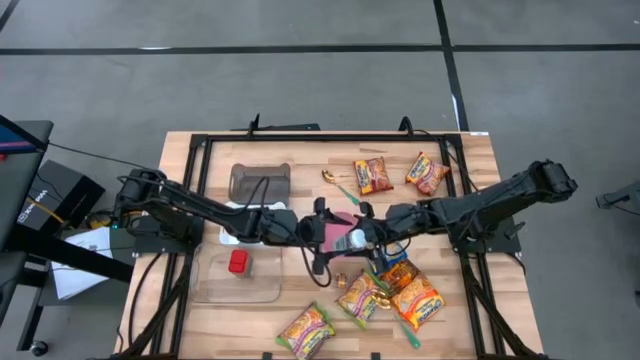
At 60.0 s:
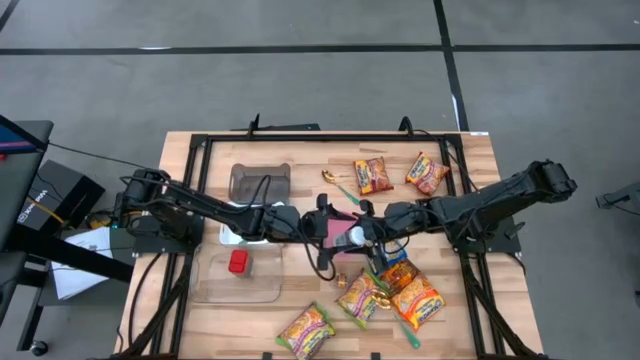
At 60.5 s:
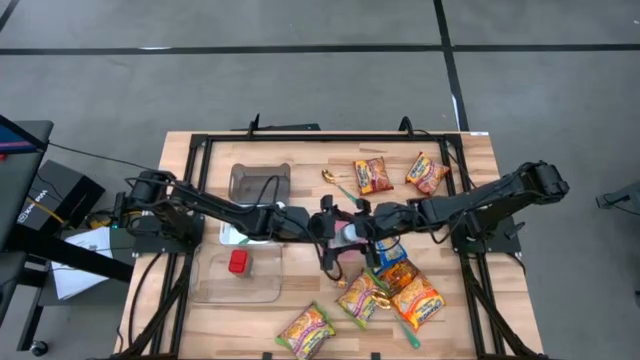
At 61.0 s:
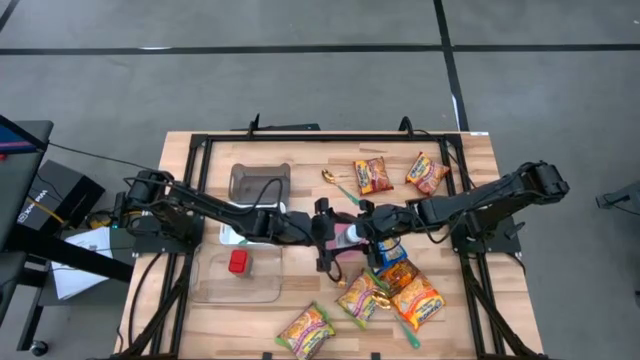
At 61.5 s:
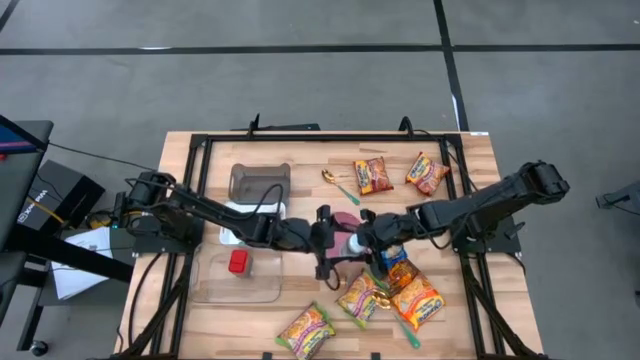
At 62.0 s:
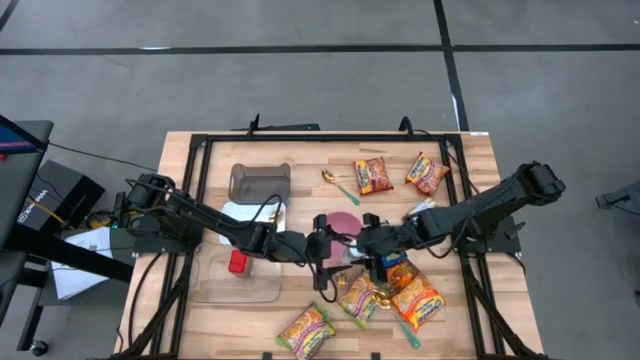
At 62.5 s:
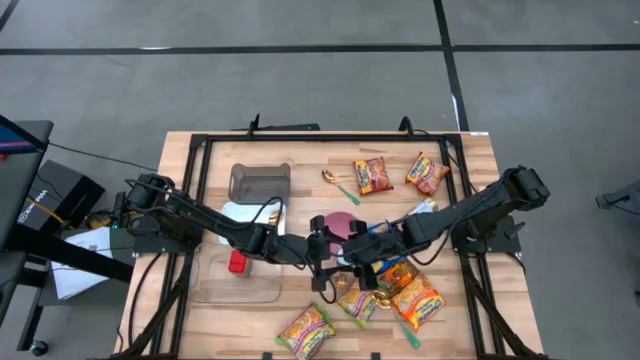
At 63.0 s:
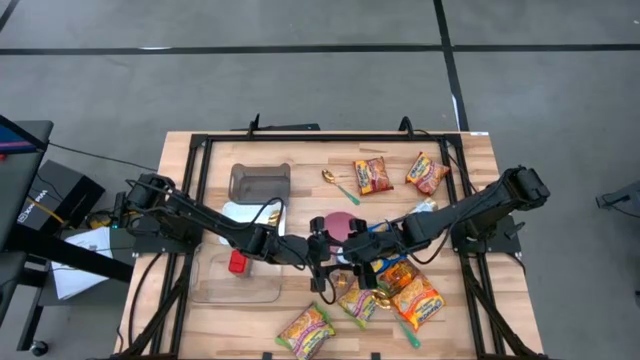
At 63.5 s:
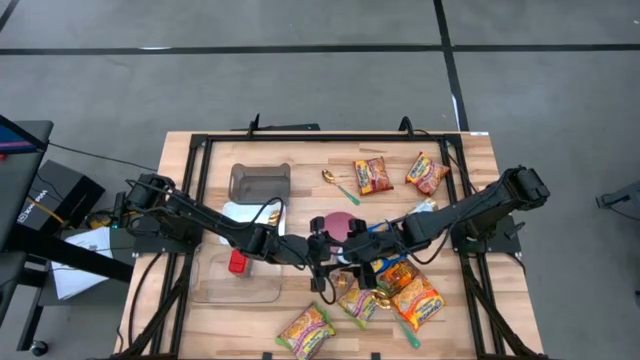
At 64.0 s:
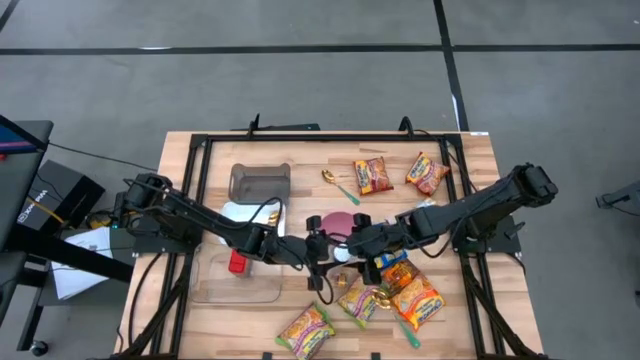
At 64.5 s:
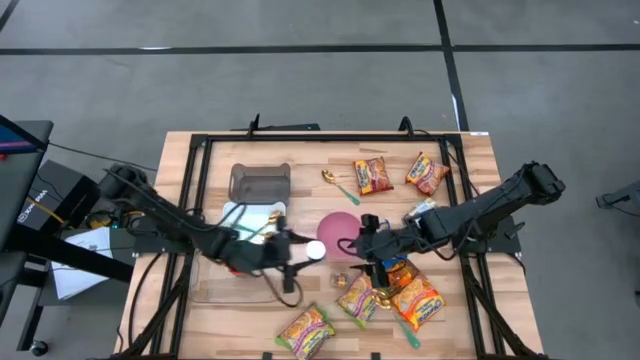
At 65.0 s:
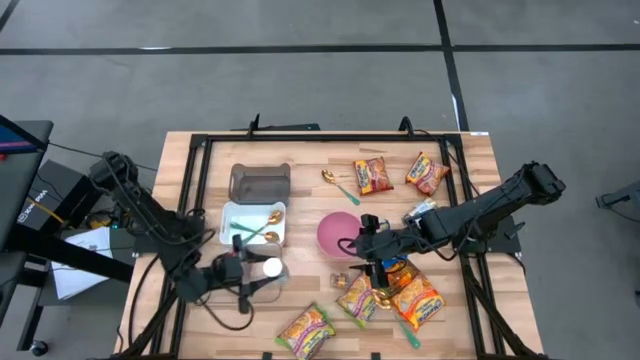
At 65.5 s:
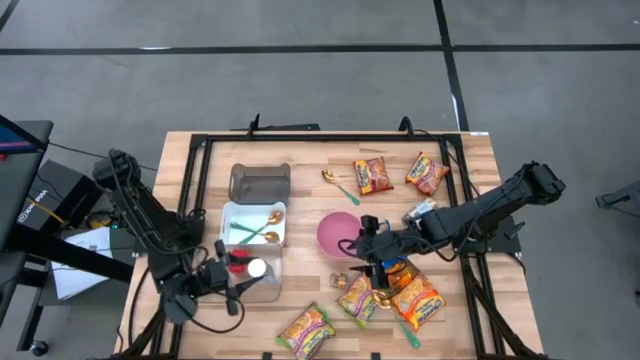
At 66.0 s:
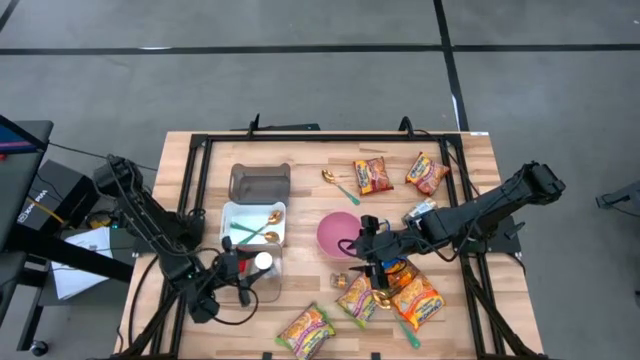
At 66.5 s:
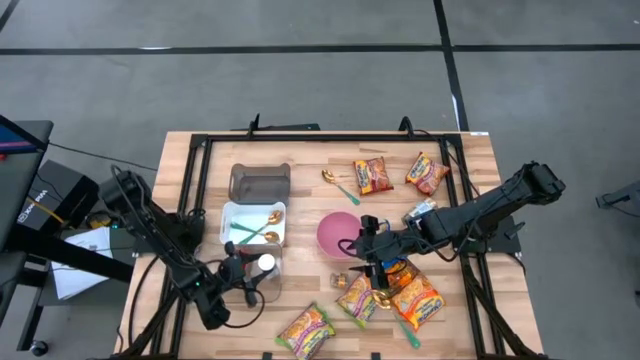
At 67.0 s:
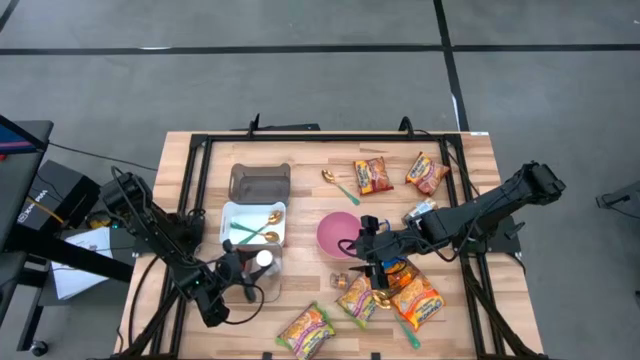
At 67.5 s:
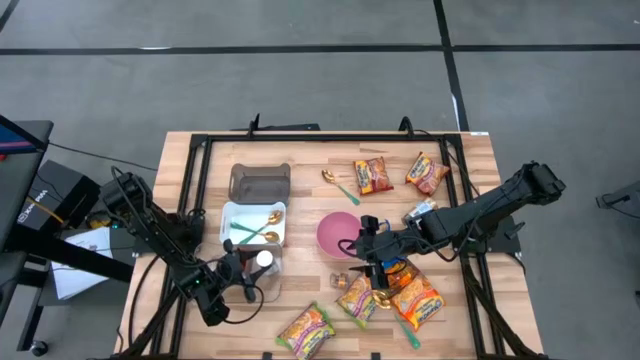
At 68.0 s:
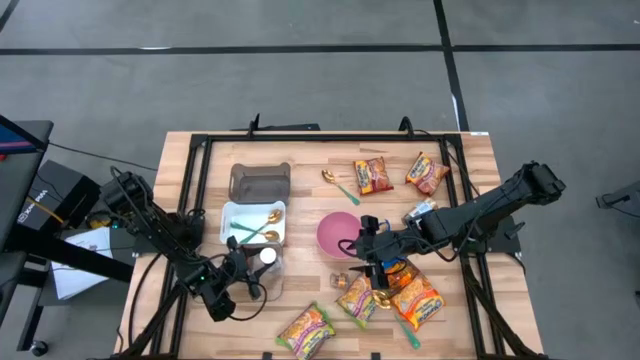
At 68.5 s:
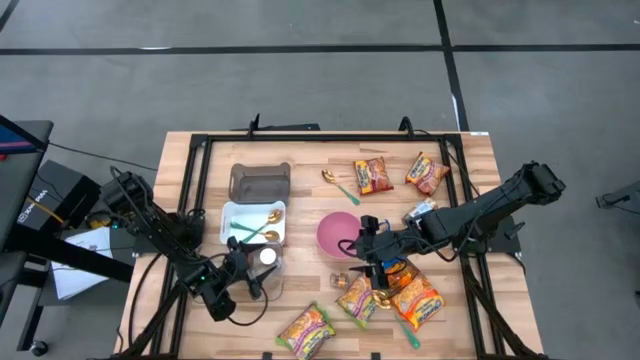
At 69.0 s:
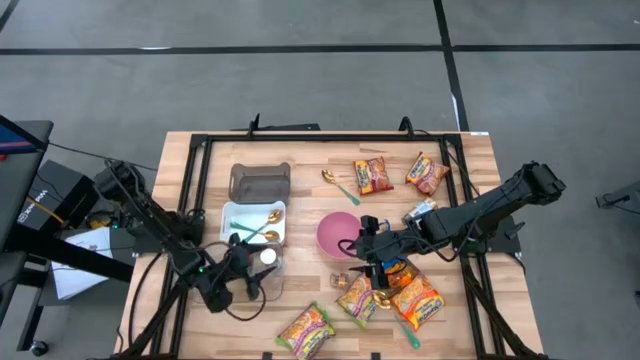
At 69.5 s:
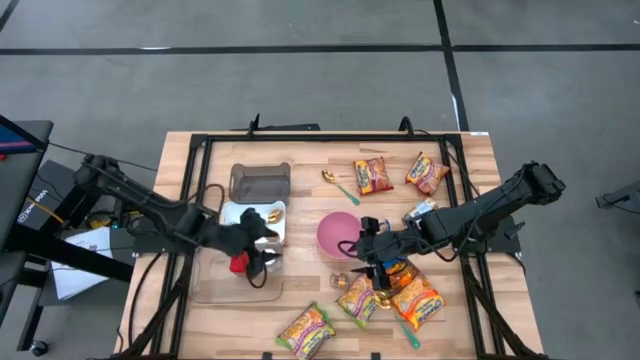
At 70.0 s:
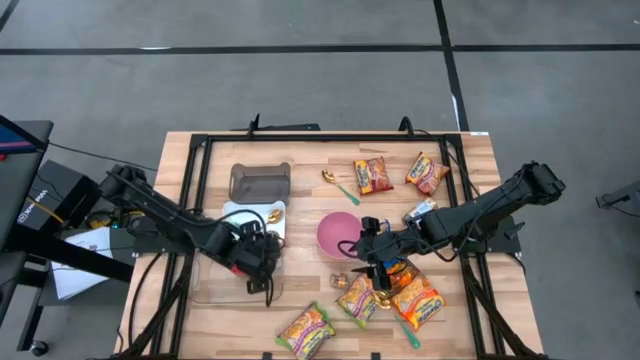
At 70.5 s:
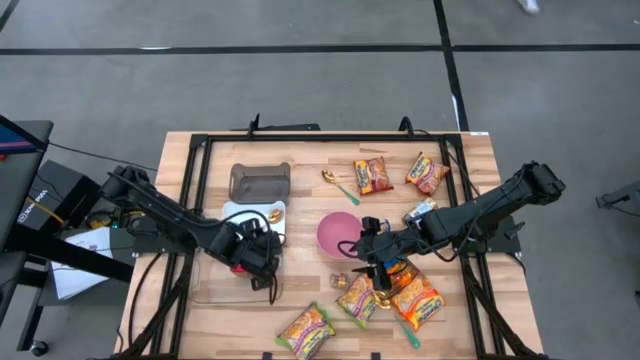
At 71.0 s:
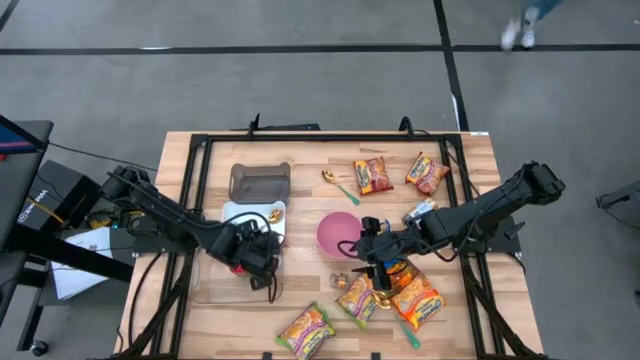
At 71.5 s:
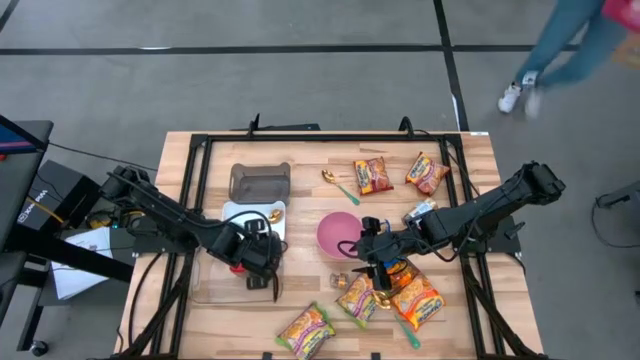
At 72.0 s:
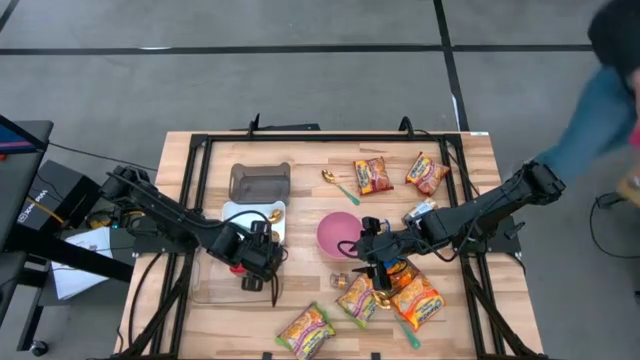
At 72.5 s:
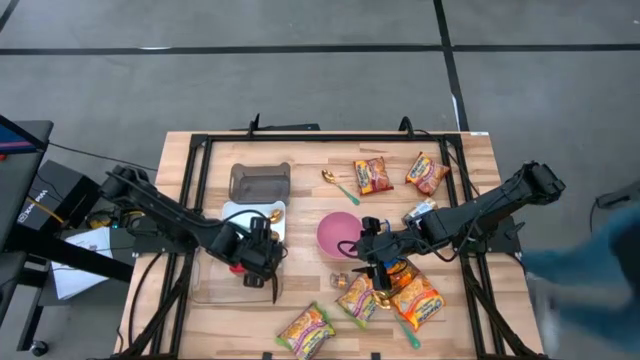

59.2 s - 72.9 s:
Task: Pick & Place Food Item
Put the white spice bottle into the transparent bin

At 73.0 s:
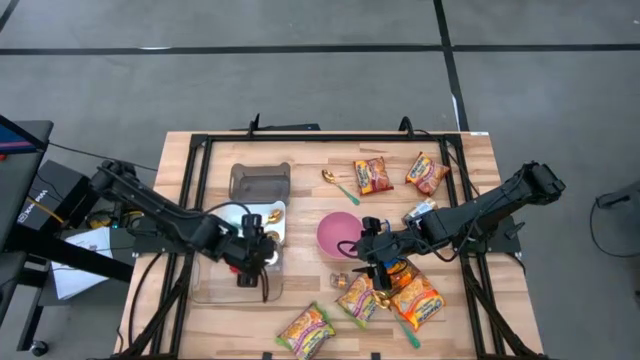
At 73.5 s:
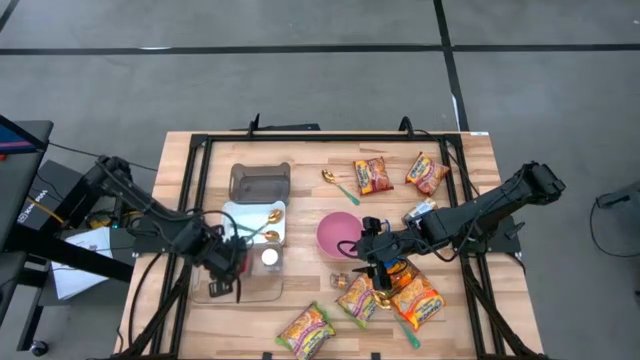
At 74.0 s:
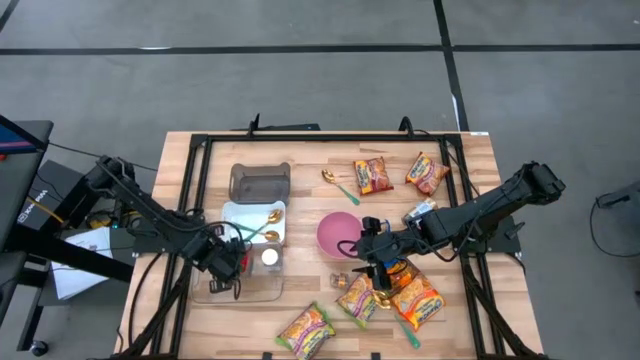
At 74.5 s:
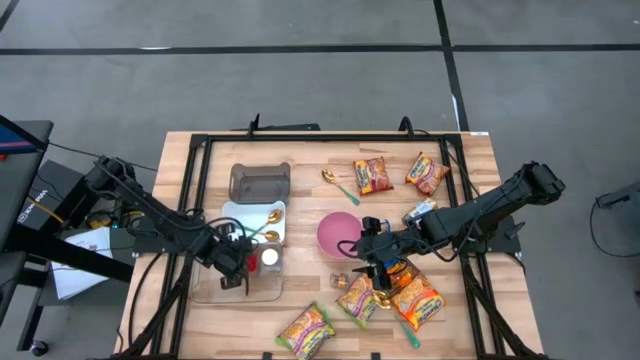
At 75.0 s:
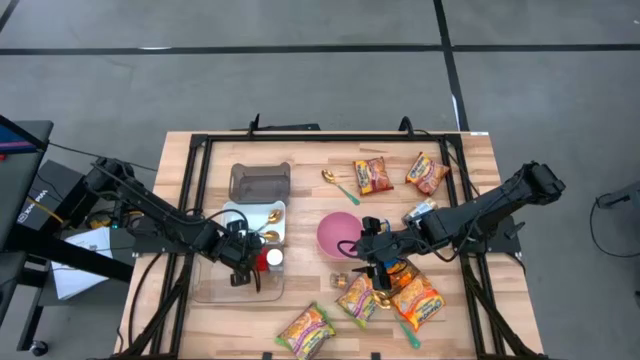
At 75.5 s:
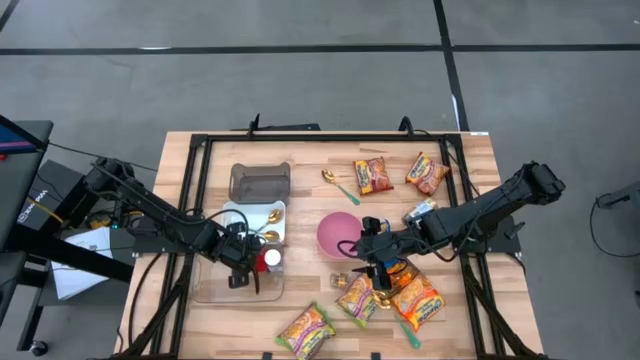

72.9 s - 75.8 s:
Adjust the red spice can in the transparent bin

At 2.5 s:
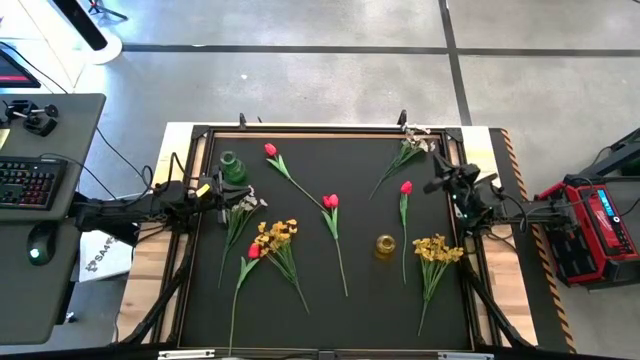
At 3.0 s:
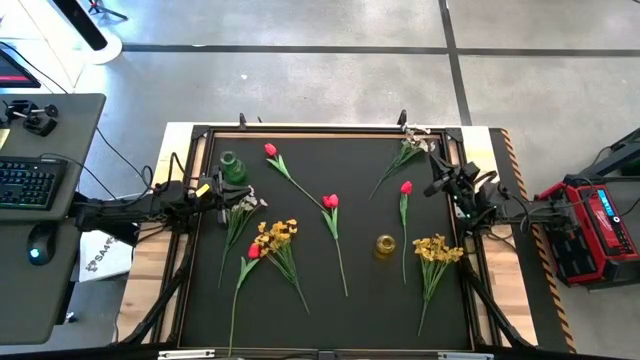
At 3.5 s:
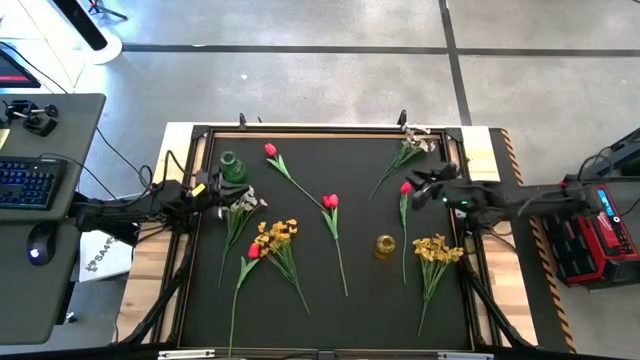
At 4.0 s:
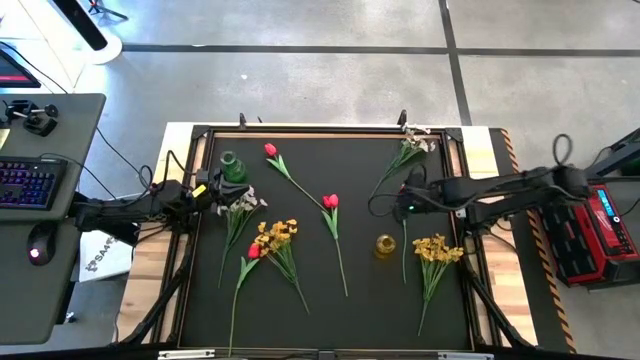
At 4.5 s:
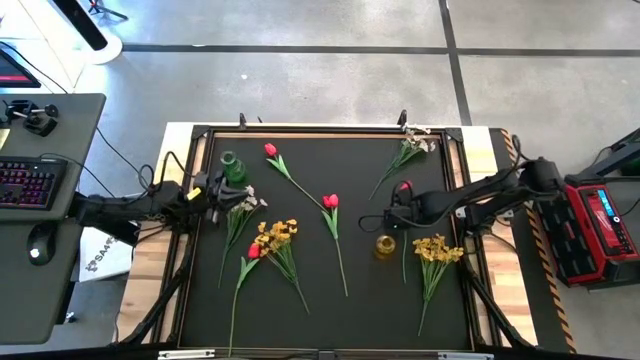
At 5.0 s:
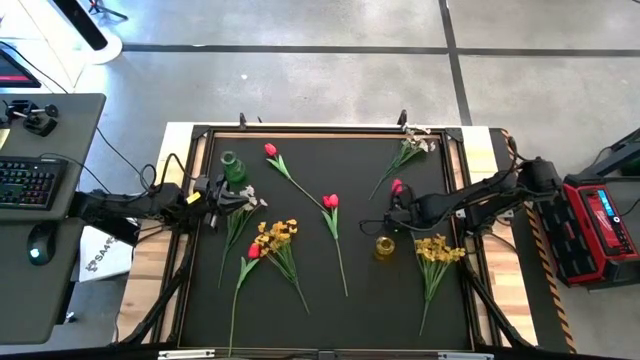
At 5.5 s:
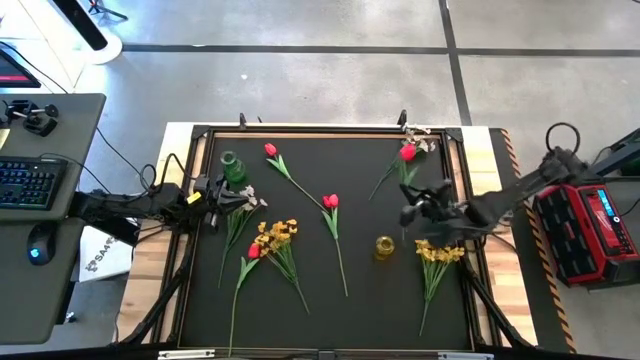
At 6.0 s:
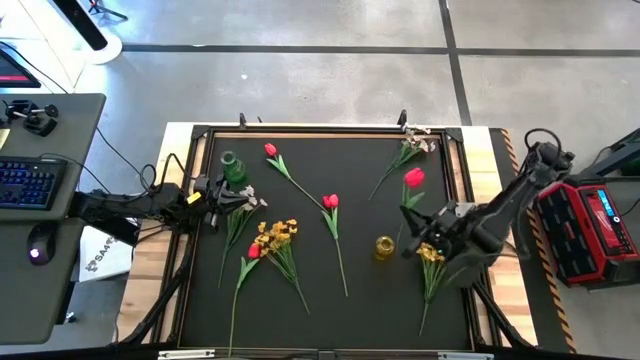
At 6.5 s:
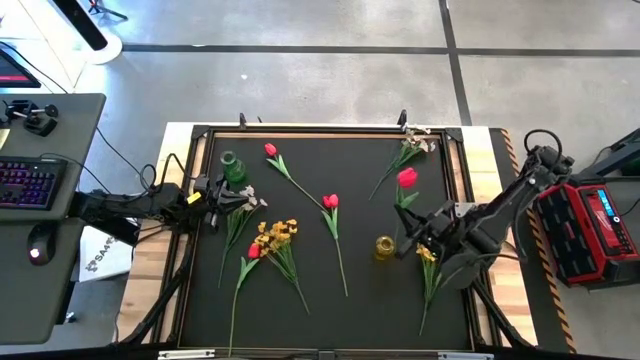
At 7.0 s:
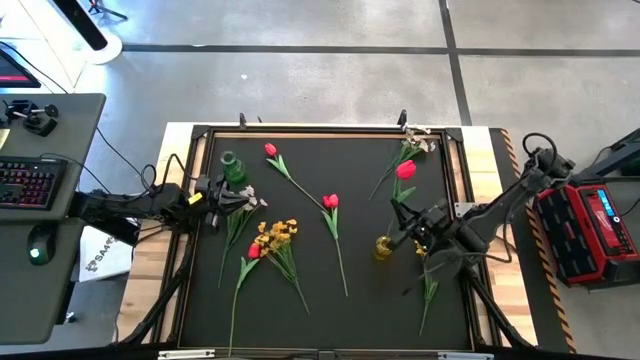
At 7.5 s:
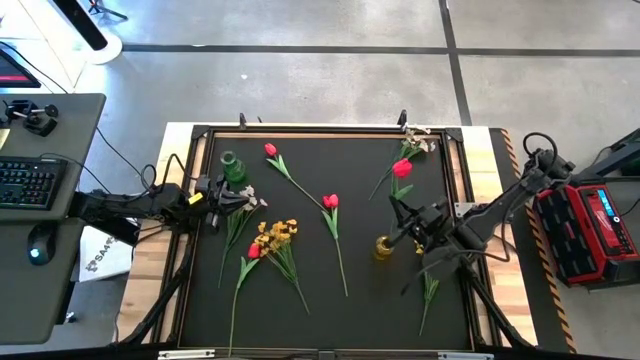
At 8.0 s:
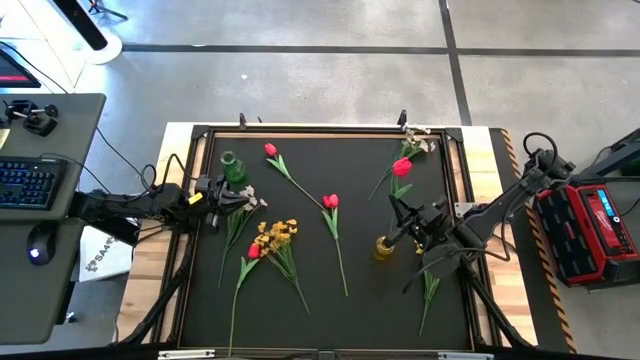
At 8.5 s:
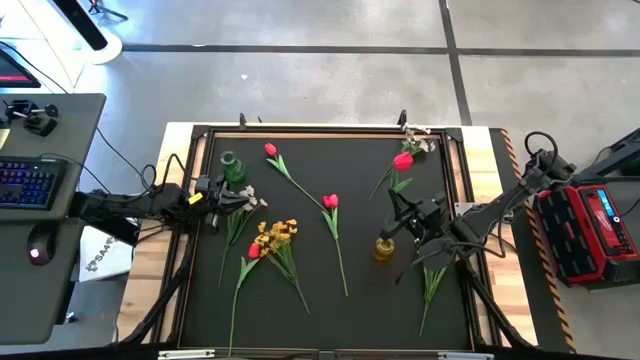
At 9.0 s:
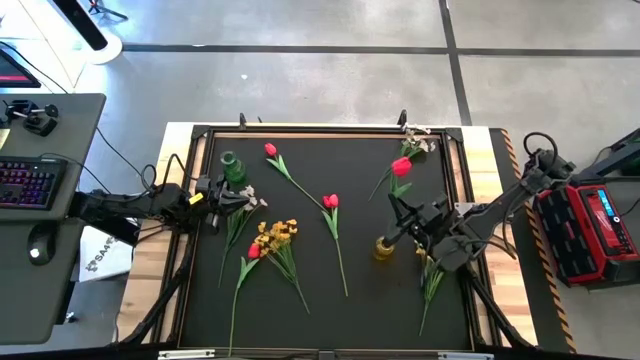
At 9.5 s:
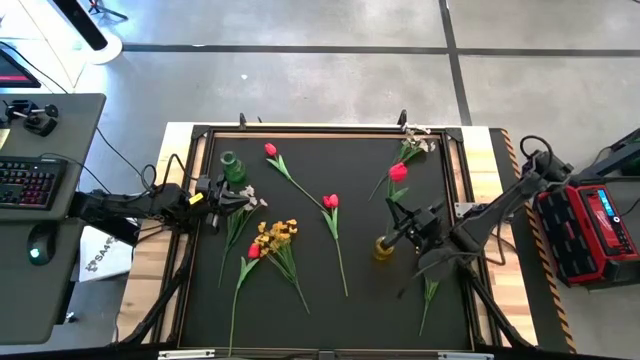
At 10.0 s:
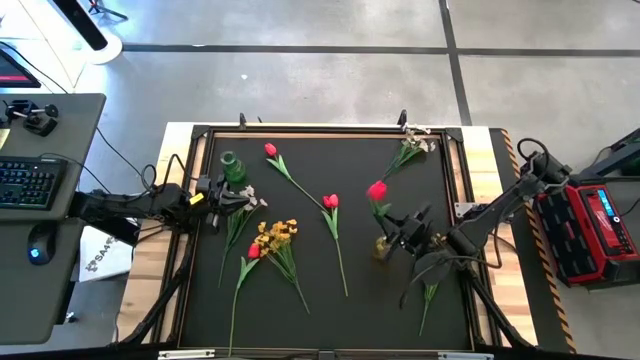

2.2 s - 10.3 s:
Task: Sort flowers into vase by color
Put the middle right red flower into the yellow flower vase
